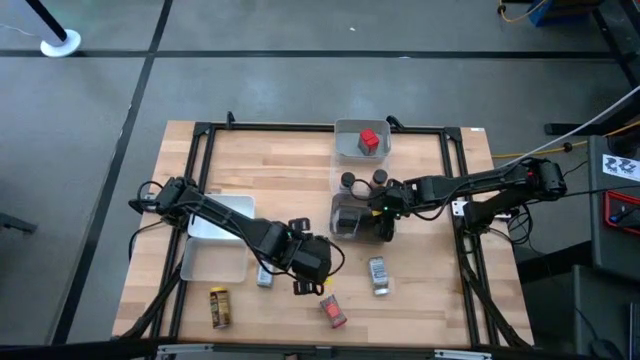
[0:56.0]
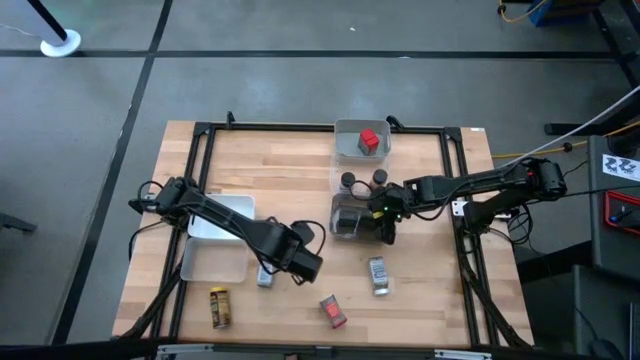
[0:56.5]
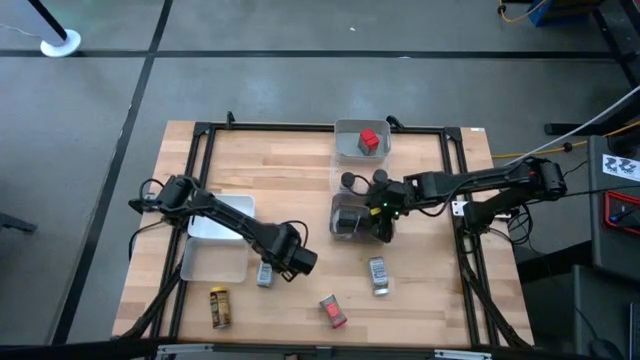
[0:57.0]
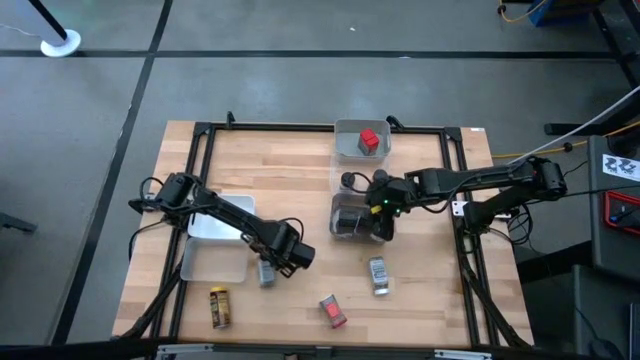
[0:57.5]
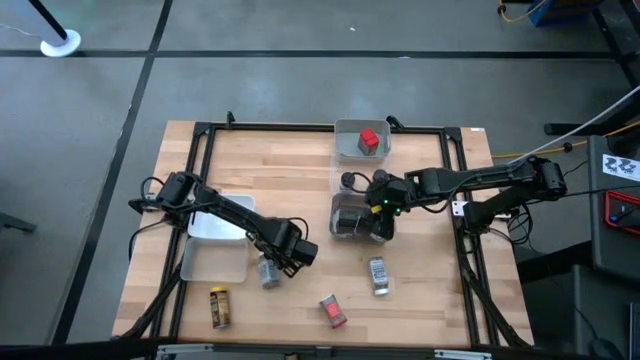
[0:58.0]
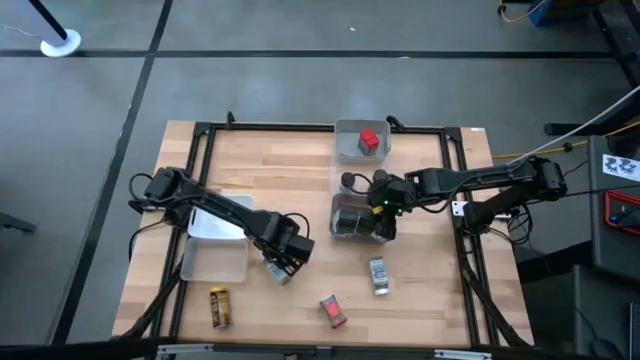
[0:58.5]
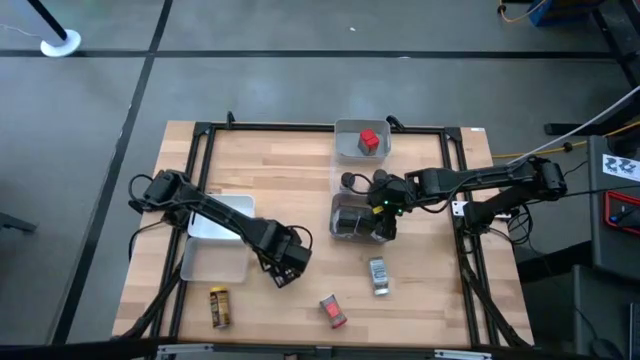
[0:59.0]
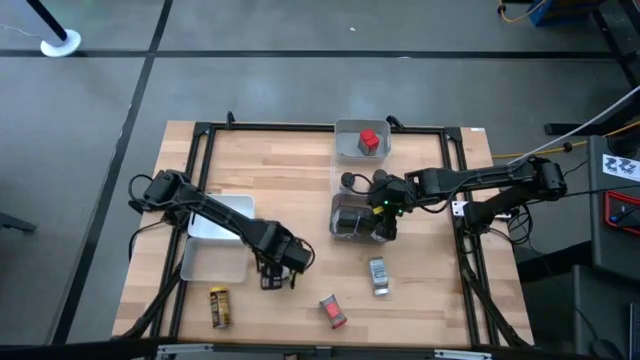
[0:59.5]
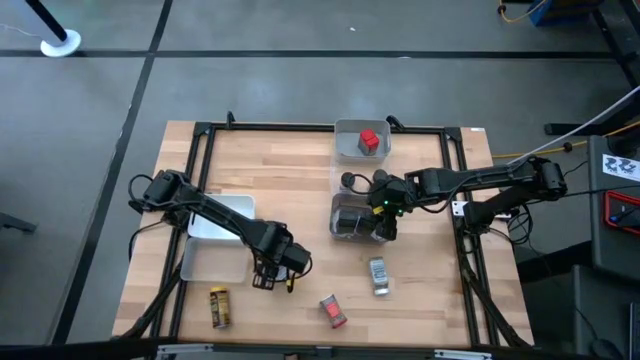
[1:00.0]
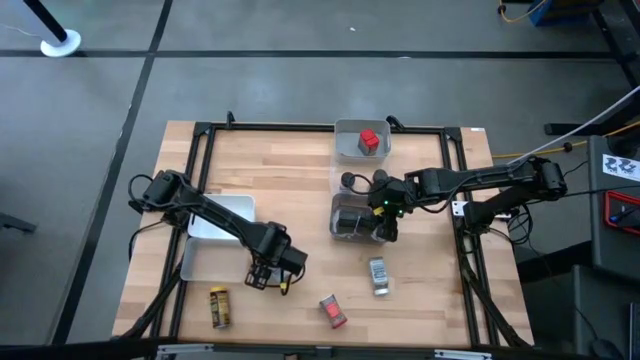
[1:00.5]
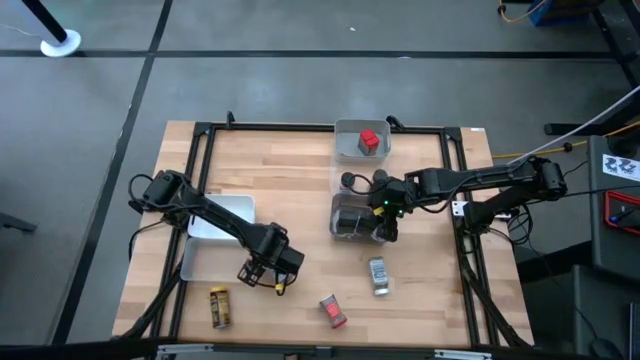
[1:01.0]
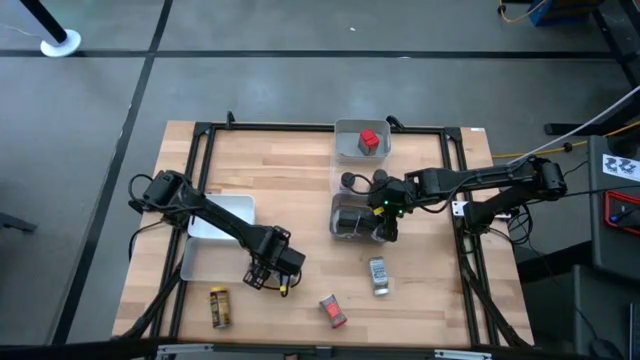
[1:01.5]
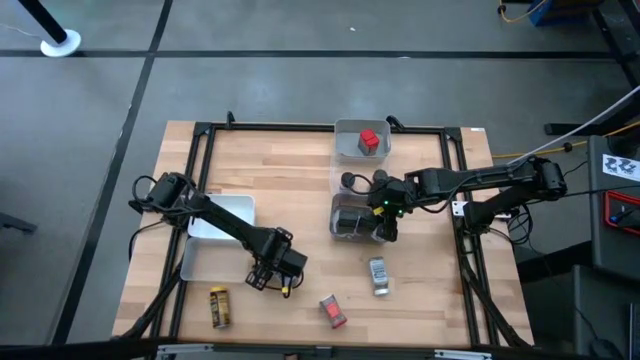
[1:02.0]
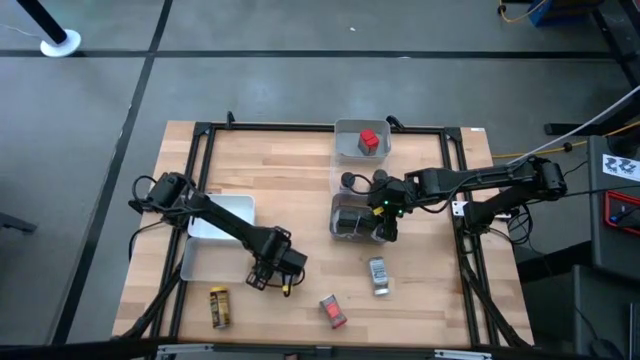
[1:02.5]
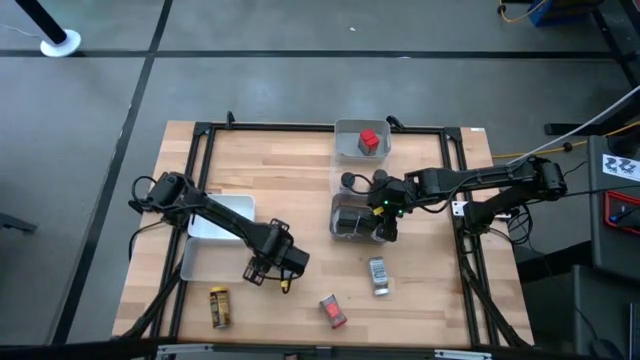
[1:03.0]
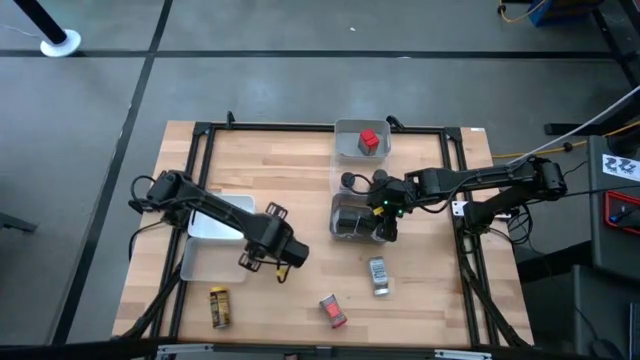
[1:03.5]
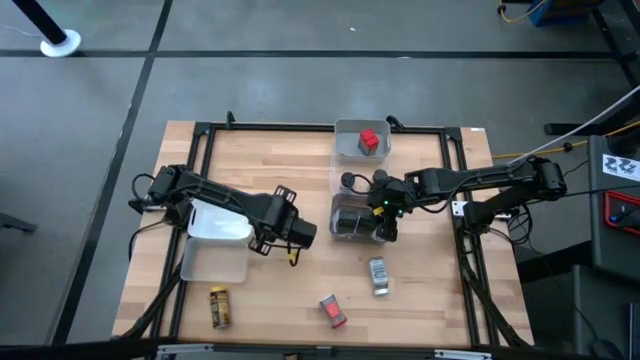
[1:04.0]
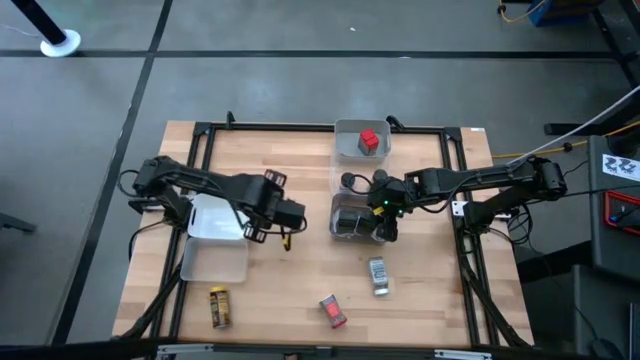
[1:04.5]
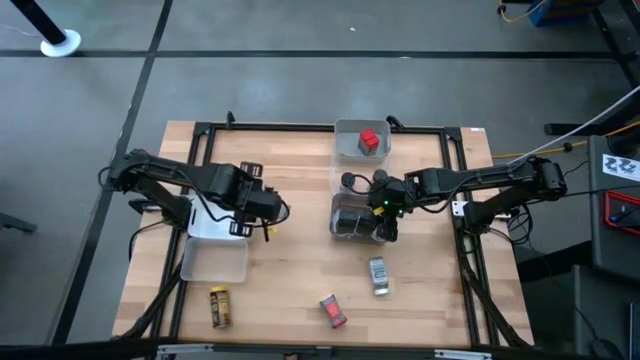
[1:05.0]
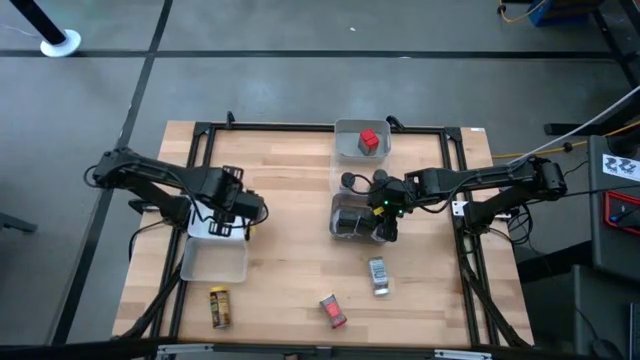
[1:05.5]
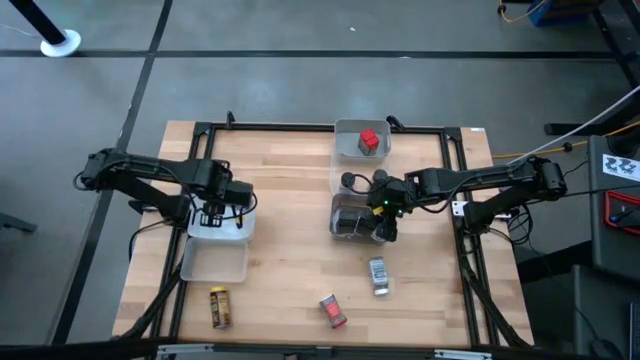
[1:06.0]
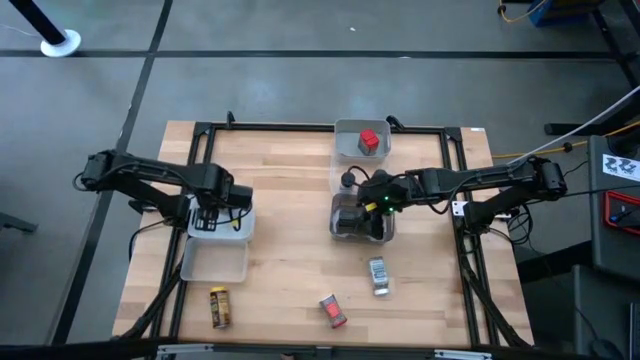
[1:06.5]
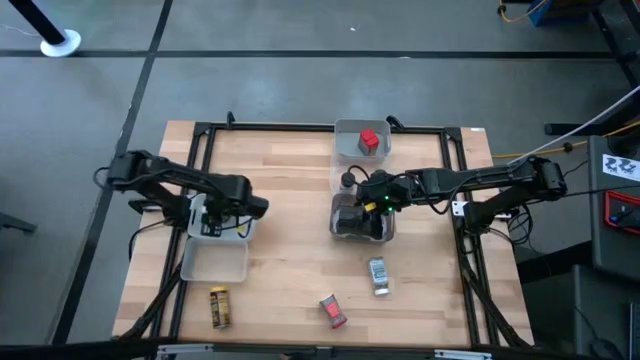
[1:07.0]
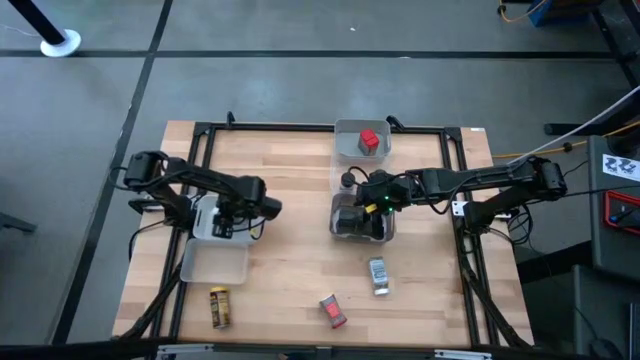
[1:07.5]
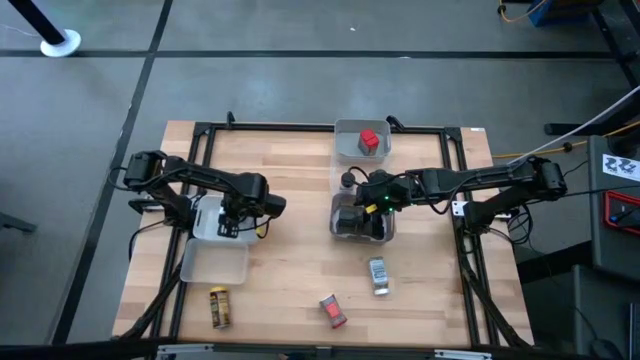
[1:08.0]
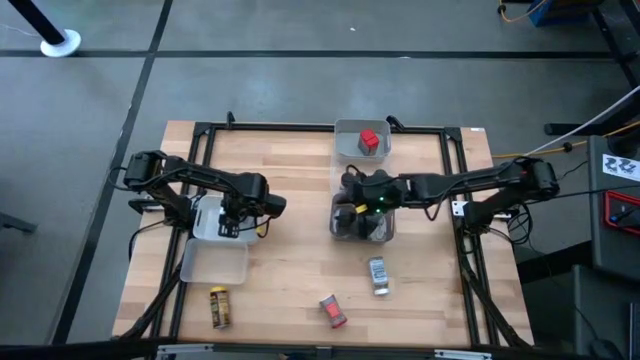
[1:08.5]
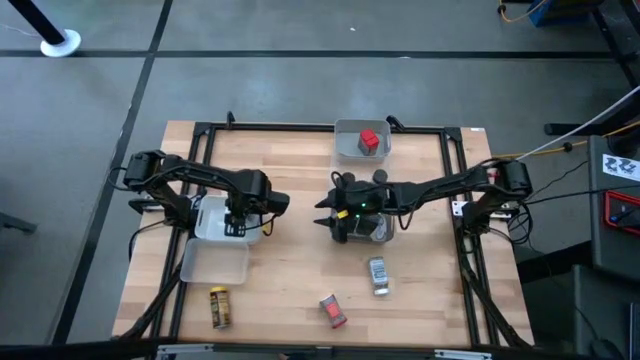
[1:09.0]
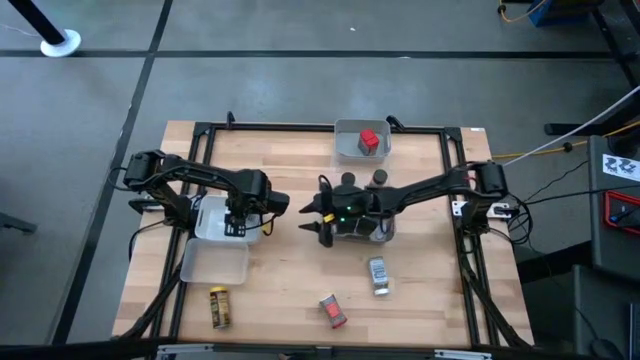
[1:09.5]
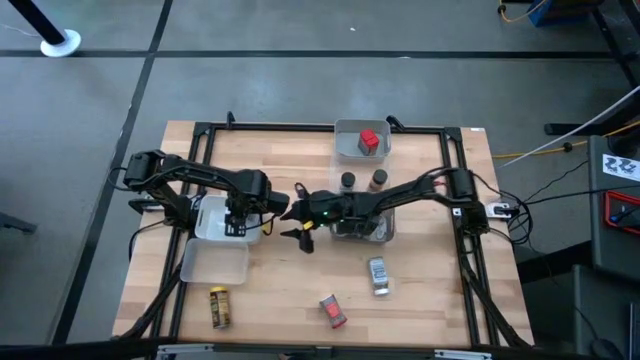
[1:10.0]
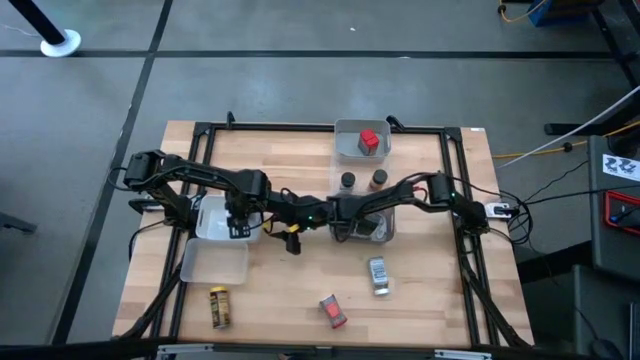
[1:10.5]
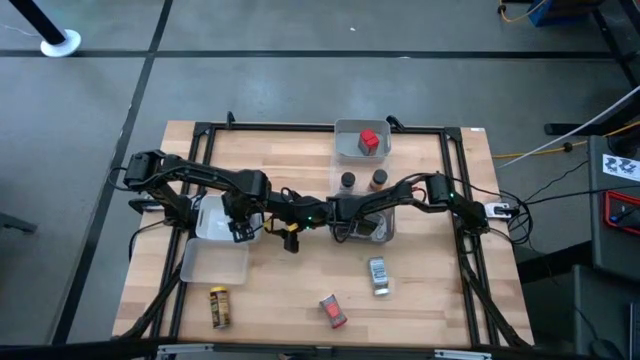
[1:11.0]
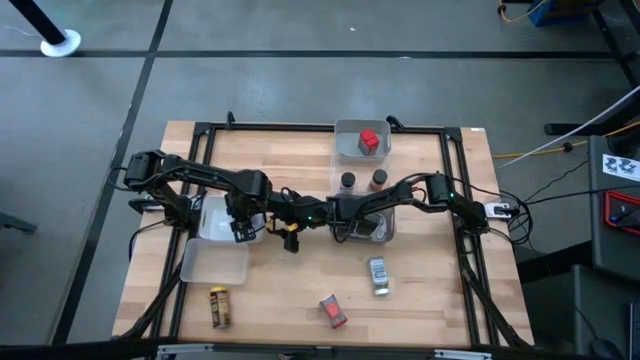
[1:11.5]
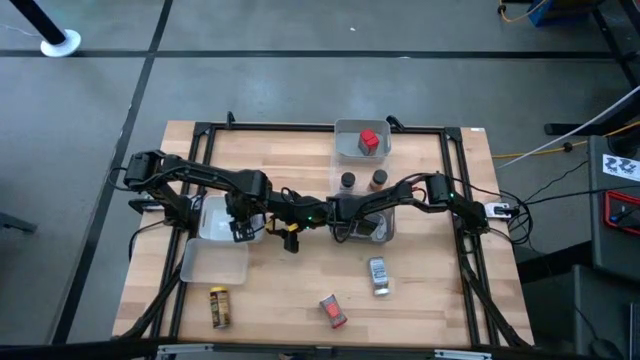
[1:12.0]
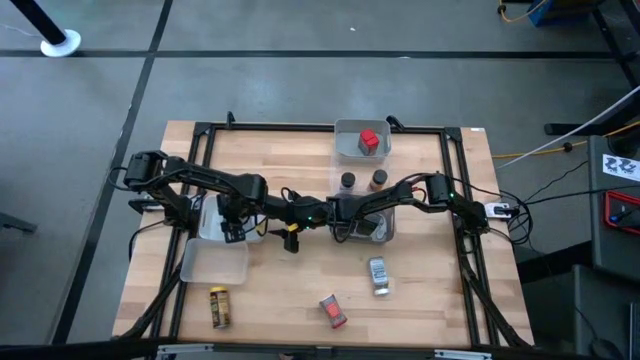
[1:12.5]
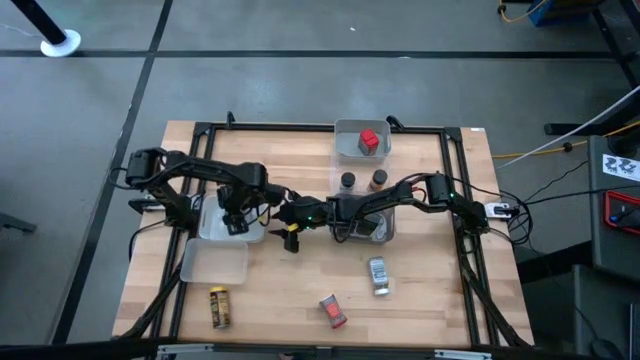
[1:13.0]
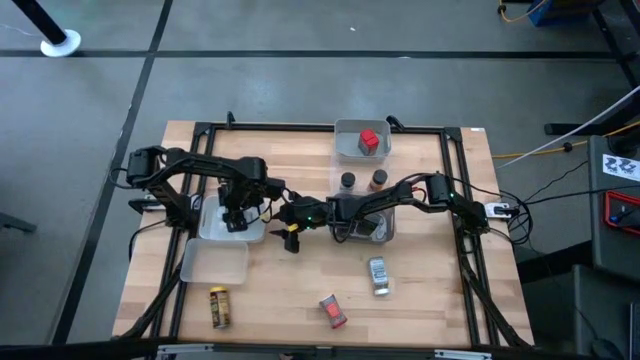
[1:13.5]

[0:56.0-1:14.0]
Task: Sort spices by type
Put the left white seasoning bottle into the white bin
